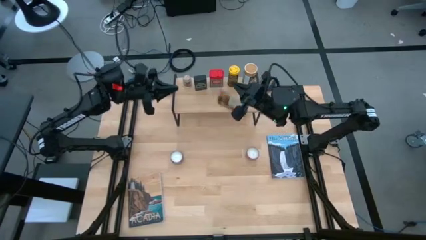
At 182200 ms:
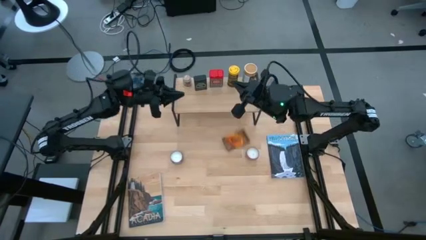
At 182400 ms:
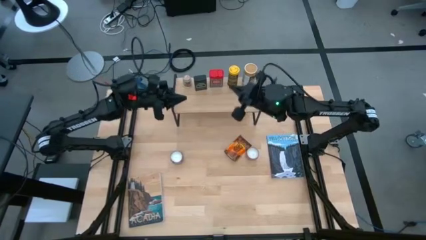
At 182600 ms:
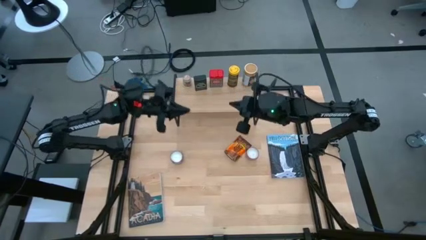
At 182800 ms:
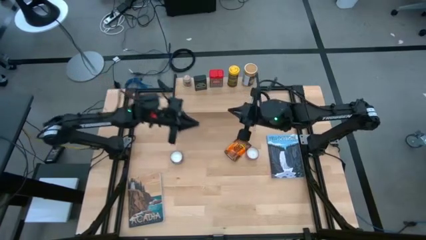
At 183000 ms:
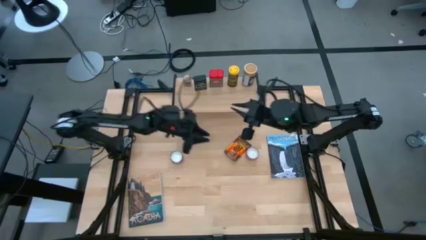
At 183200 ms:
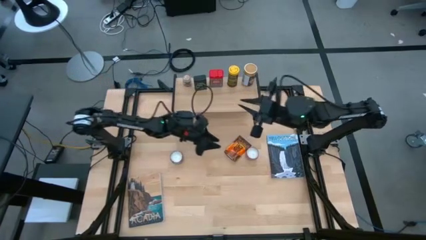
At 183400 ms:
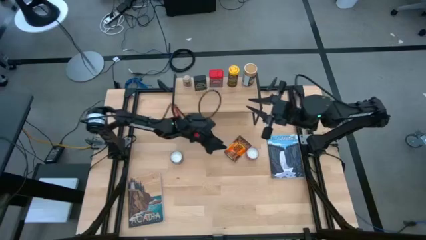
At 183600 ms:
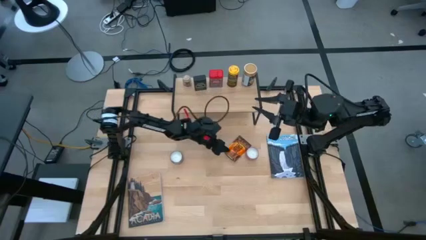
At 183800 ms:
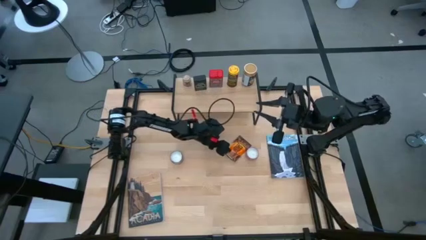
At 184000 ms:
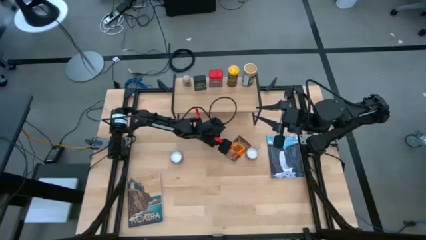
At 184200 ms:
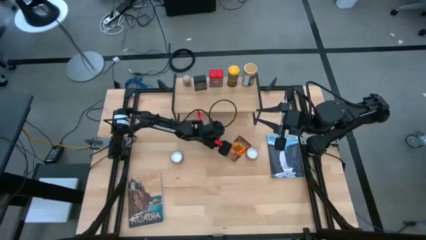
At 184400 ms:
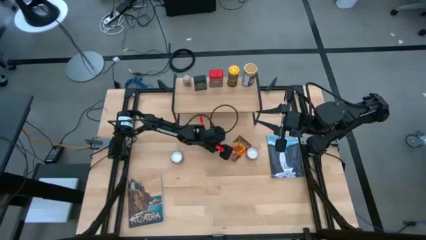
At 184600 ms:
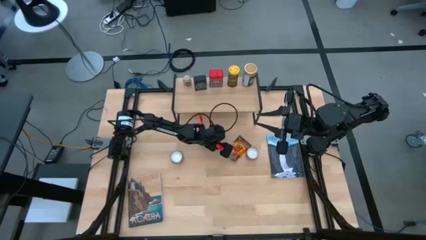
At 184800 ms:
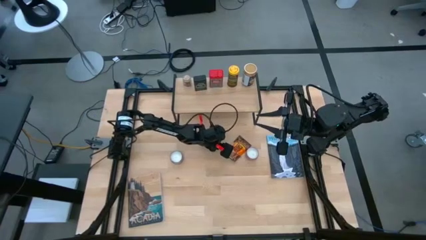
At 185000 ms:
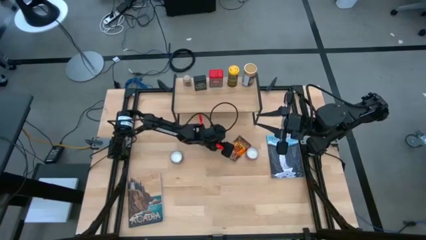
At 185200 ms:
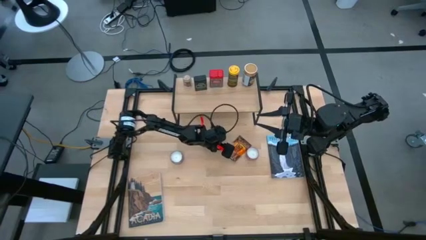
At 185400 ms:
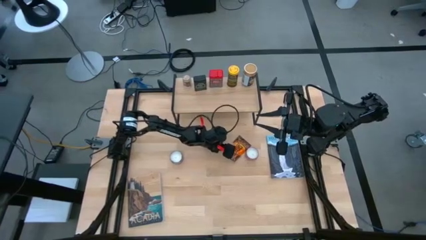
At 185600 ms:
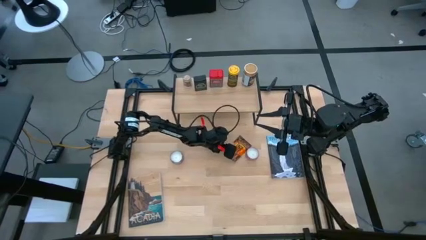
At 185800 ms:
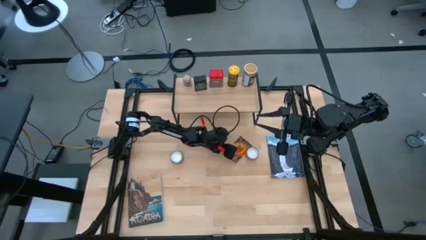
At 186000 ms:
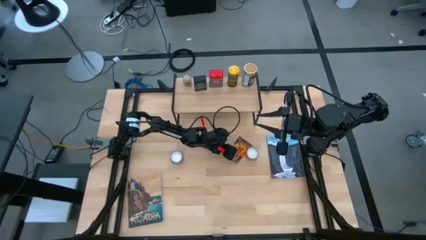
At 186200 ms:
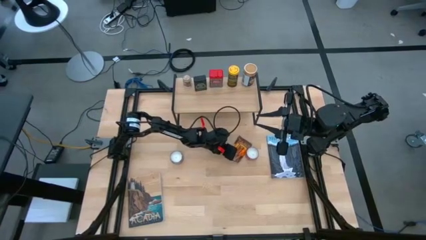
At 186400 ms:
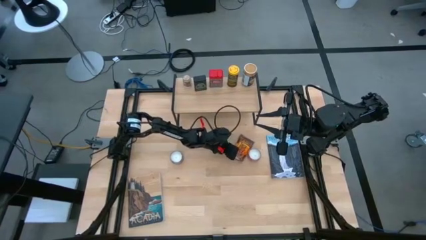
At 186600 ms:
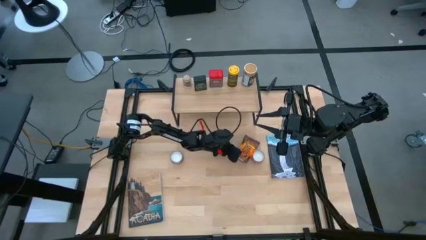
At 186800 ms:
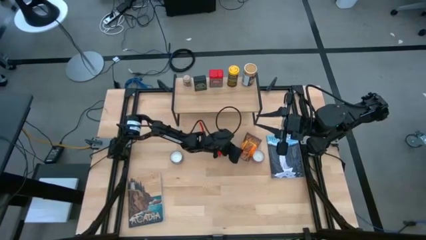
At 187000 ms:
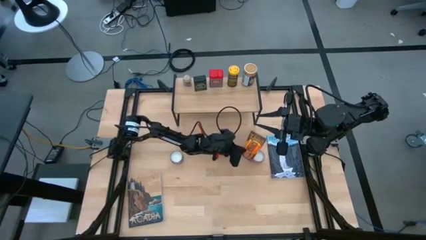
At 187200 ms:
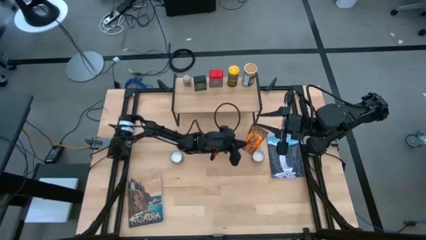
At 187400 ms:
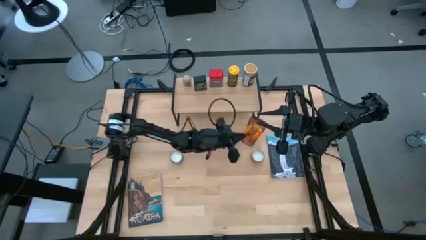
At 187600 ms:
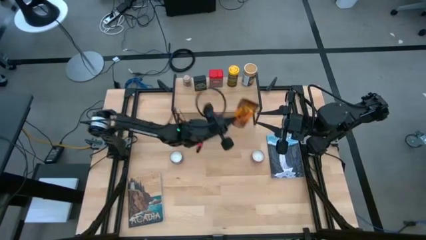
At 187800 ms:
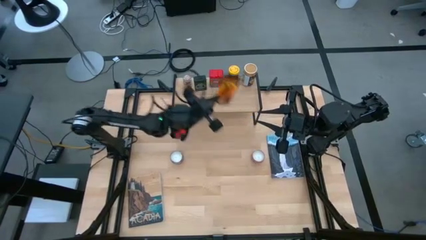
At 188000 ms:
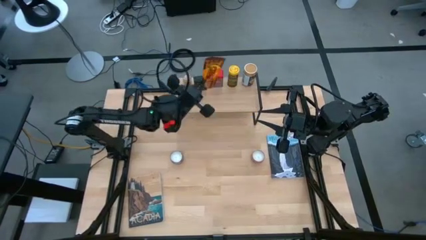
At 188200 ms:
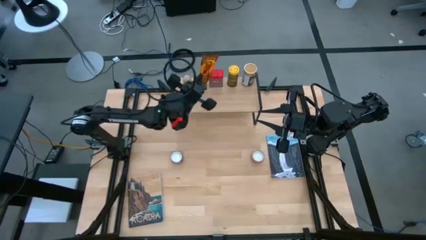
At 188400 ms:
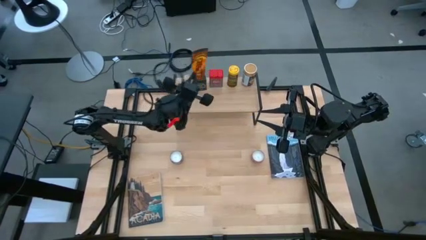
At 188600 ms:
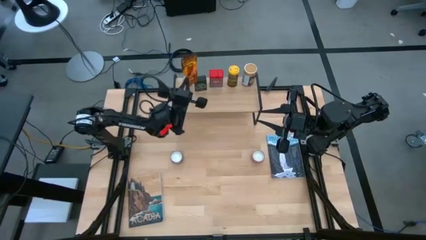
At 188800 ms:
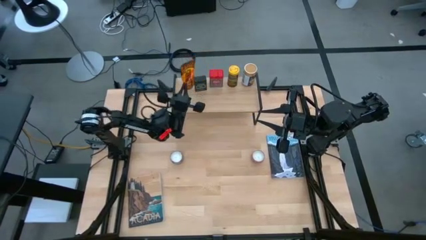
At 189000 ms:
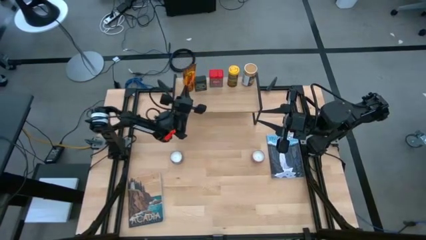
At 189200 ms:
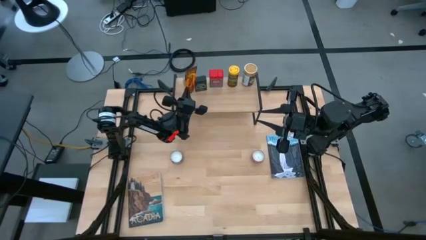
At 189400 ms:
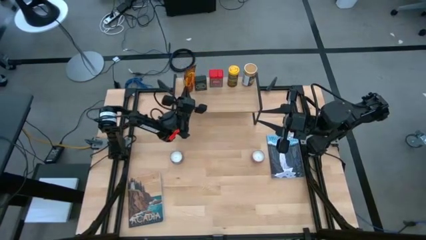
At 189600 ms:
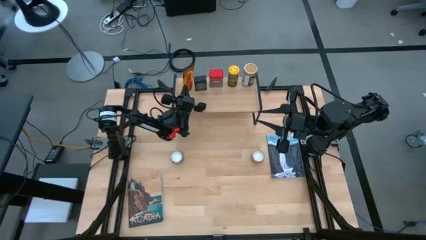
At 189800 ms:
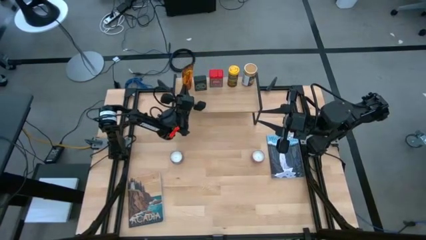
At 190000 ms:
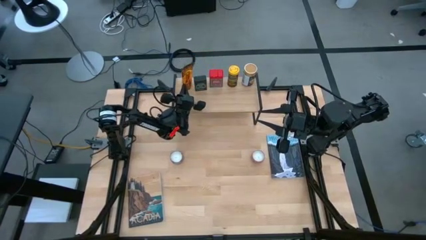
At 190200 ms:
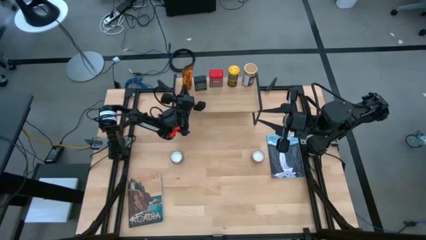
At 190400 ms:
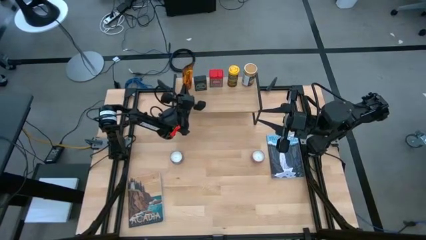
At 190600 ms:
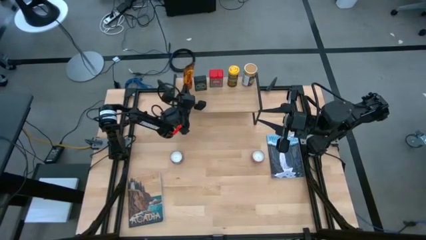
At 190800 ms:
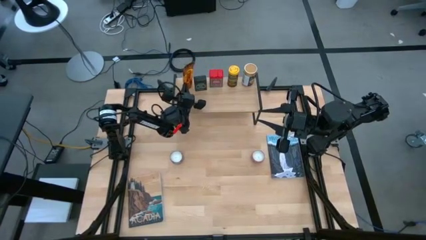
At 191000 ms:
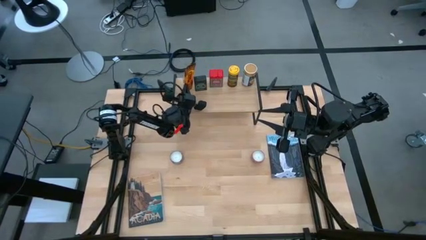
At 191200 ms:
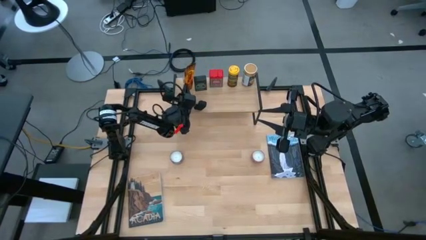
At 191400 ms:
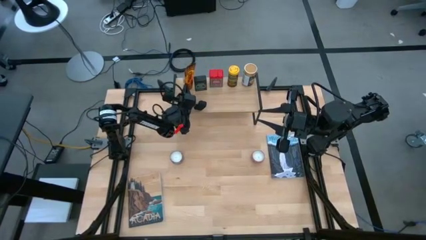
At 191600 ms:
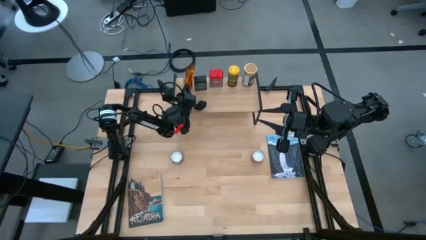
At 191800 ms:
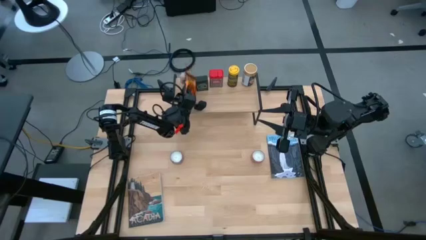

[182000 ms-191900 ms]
Task: Shelf spices
Put the orange seasoning pack on the shelf

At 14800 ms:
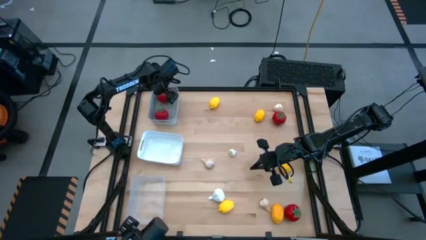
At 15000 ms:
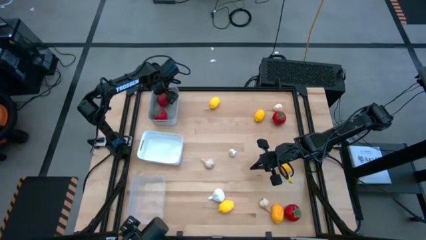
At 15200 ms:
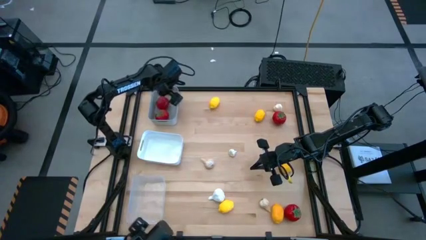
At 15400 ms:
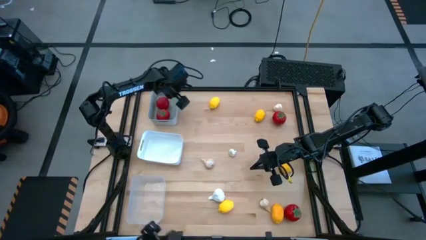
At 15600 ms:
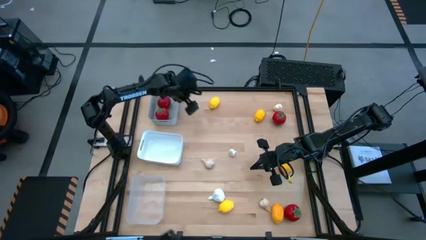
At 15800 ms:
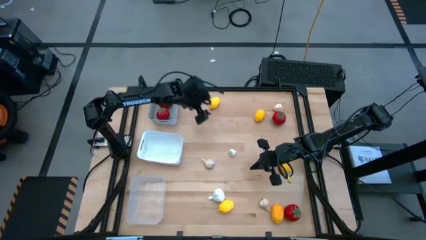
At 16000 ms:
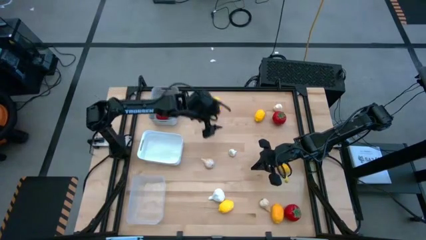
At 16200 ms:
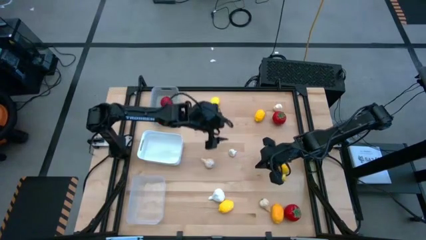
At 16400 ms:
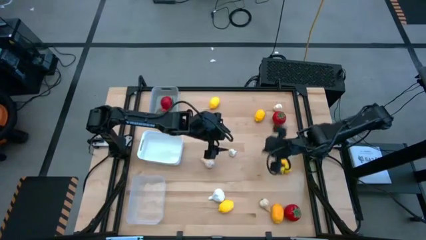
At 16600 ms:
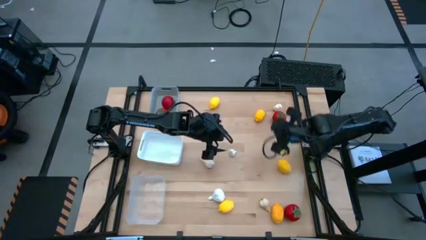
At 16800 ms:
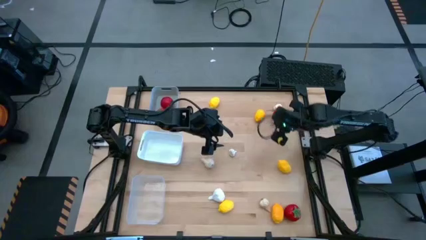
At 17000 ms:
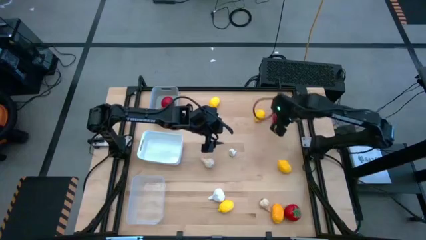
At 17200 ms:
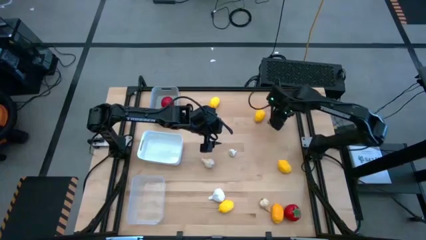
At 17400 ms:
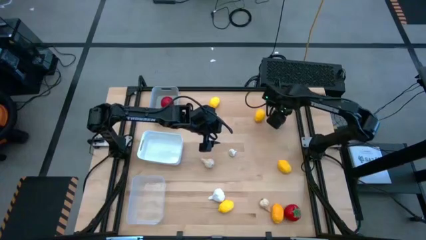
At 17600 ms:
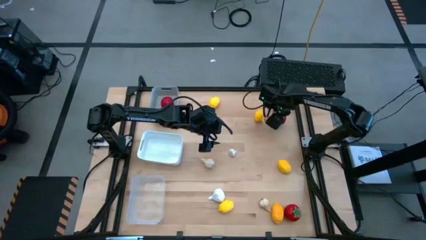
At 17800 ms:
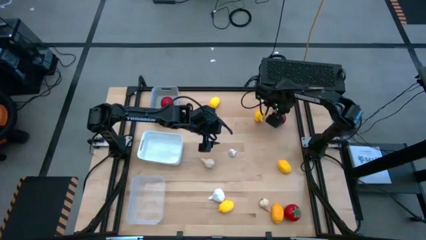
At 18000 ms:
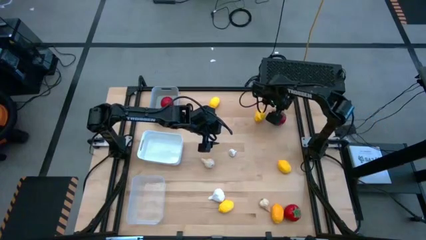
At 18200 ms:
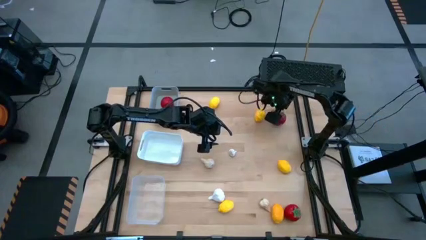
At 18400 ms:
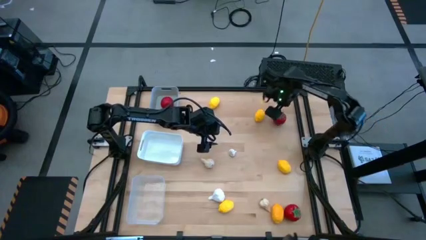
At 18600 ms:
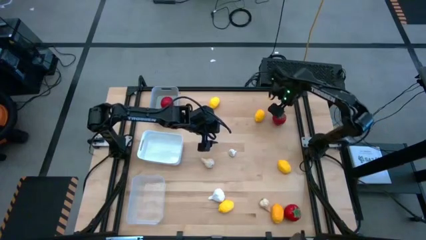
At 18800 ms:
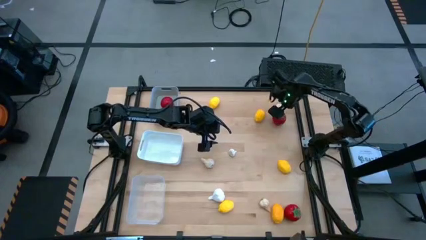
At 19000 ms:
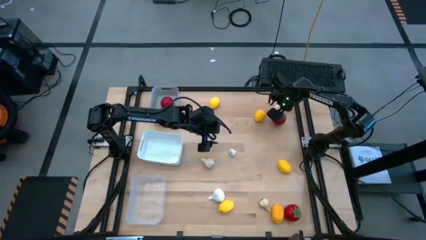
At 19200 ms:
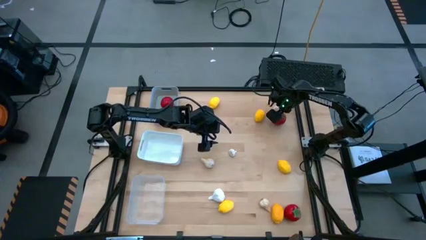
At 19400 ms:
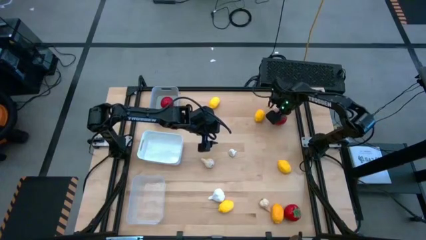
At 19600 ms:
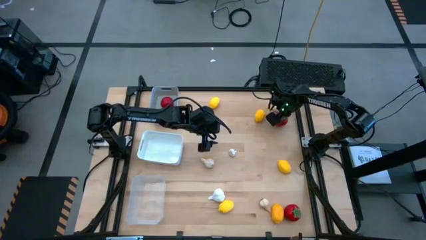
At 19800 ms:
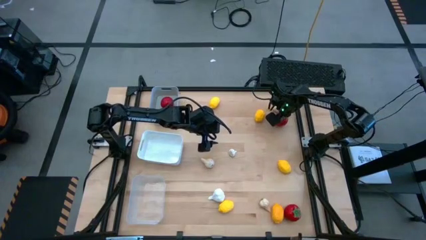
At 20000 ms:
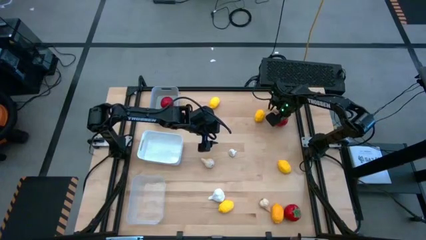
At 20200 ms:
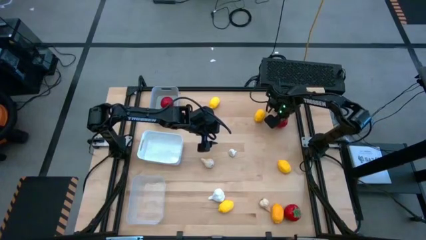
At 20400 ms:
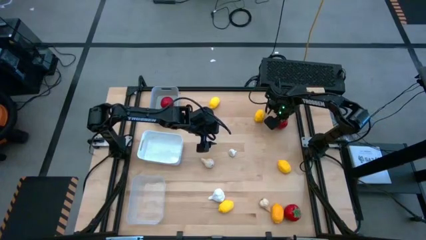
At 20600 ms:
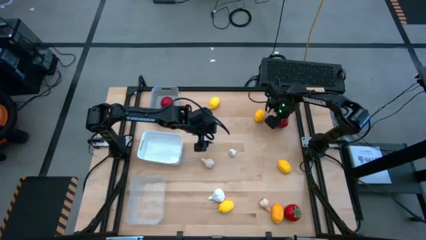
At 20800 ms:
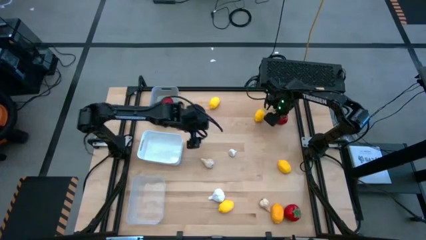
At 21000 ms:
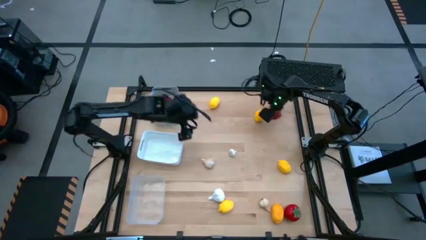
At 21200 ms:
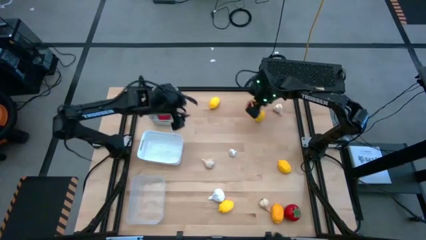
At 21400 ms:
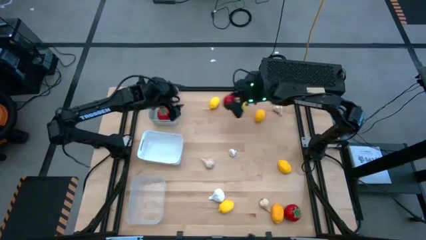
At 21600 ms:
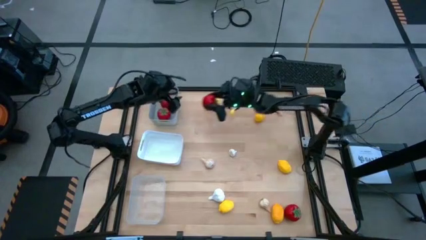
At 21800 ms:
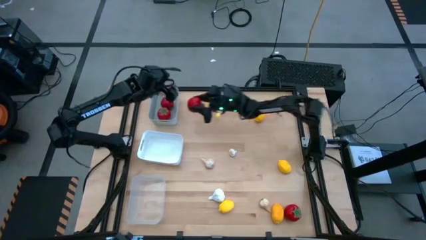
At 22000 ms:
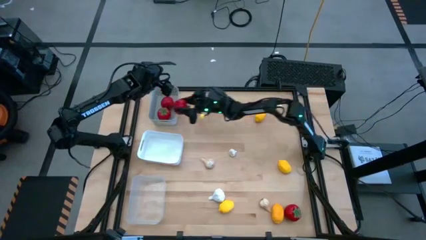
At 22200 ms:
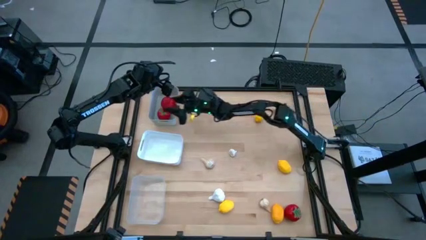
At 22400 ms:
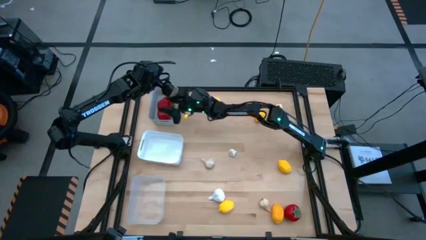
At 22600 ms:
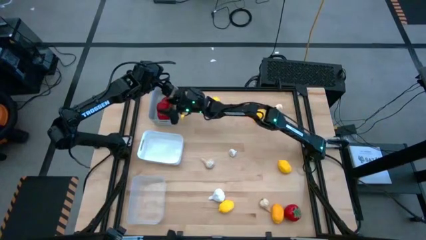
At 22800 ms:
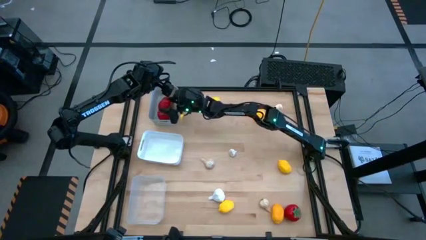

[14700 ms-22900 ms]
Task: Sort produce into baskets
Put the red tomato into the gray bin
